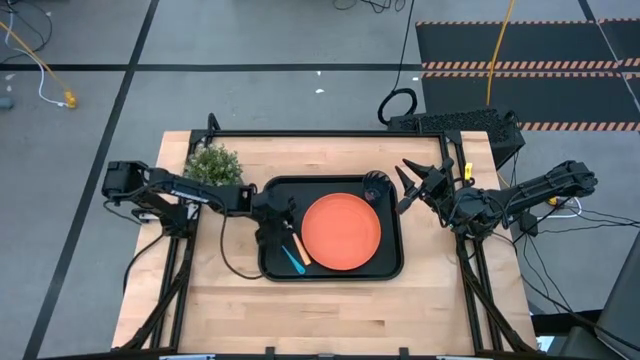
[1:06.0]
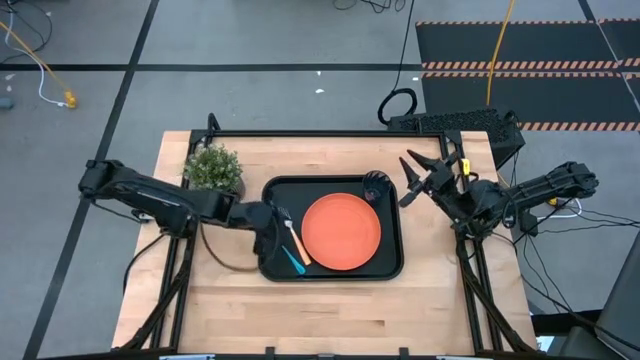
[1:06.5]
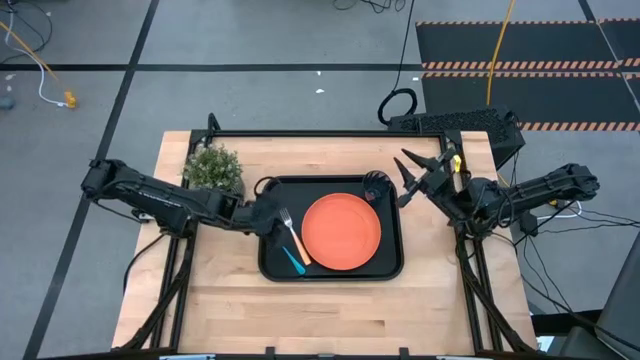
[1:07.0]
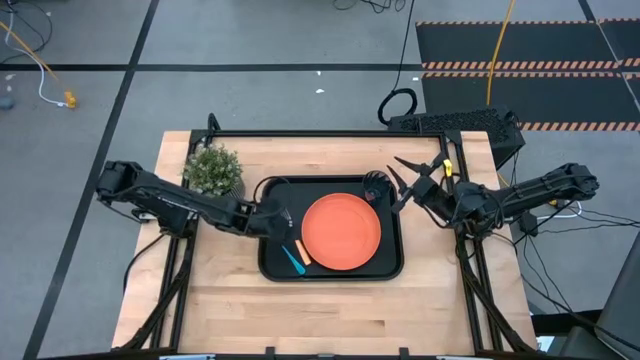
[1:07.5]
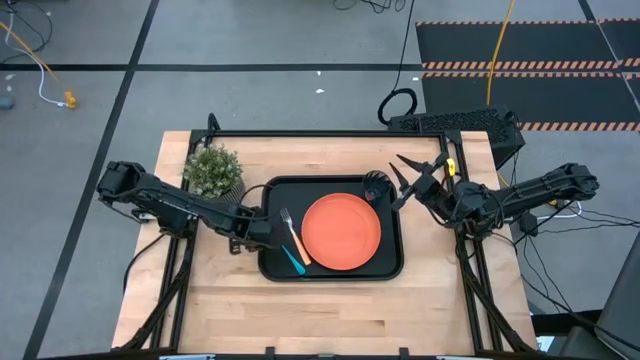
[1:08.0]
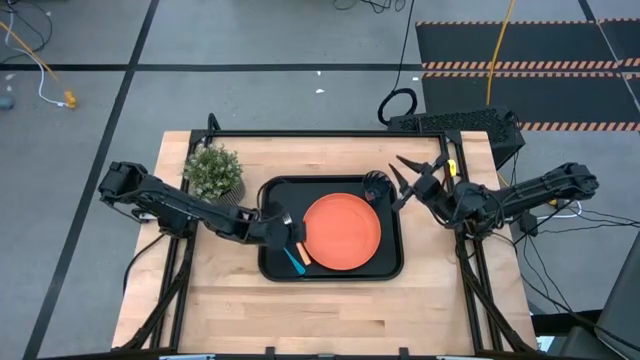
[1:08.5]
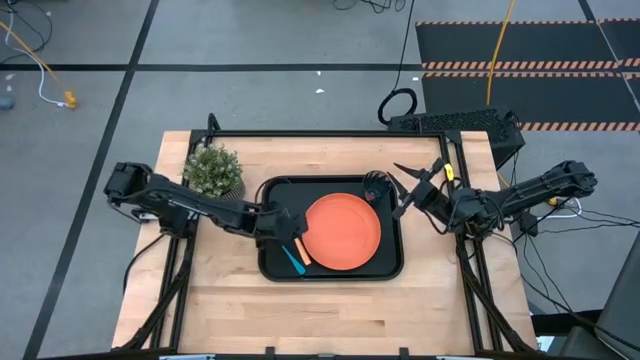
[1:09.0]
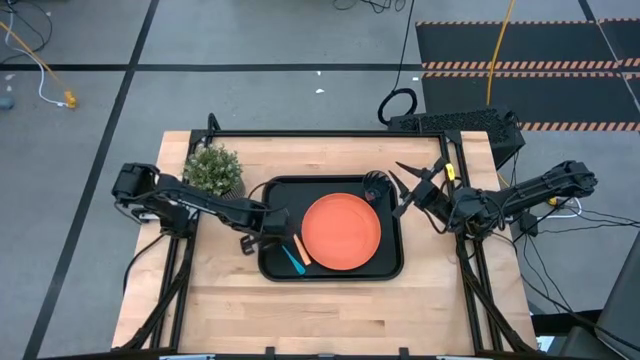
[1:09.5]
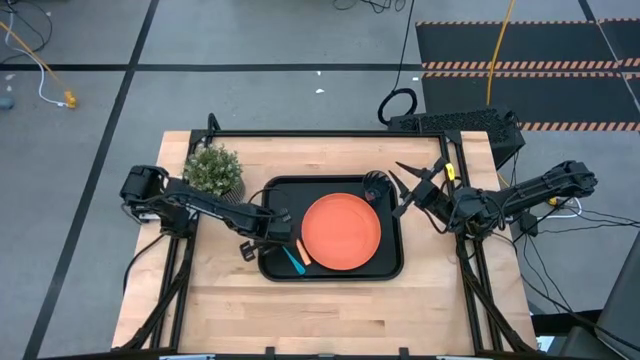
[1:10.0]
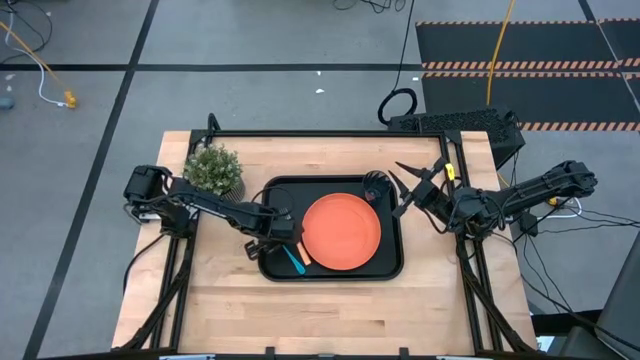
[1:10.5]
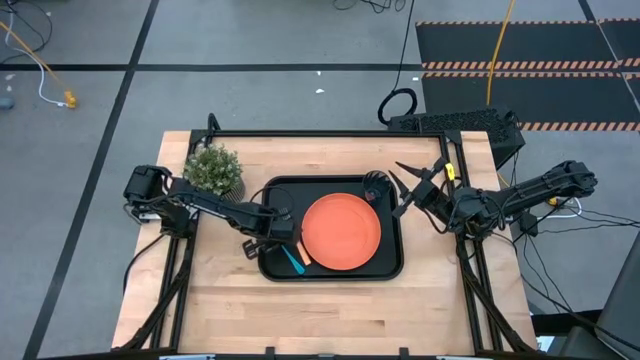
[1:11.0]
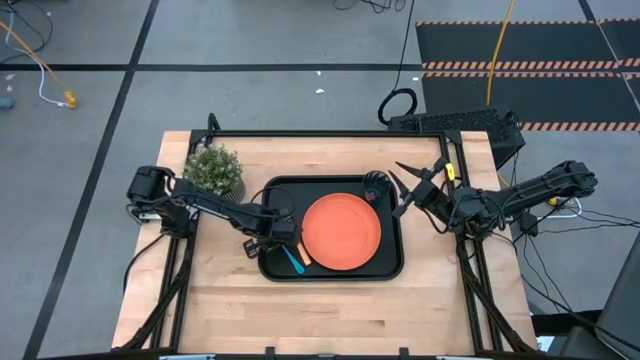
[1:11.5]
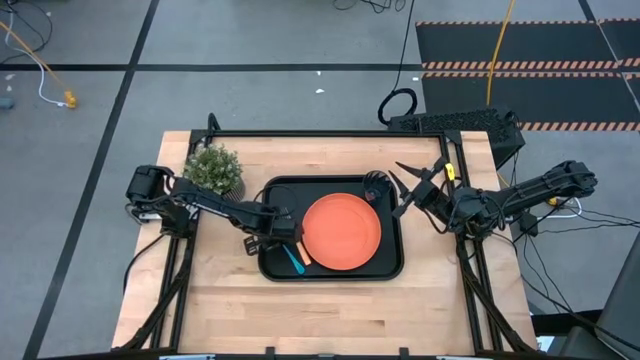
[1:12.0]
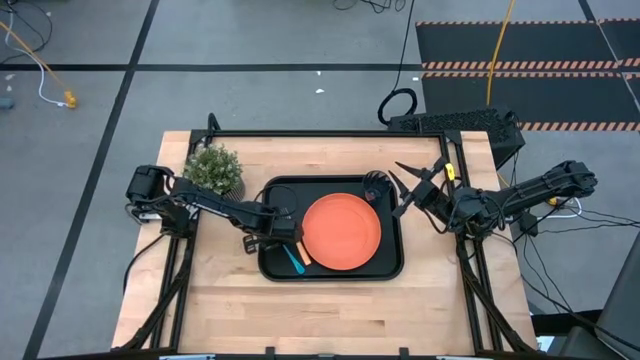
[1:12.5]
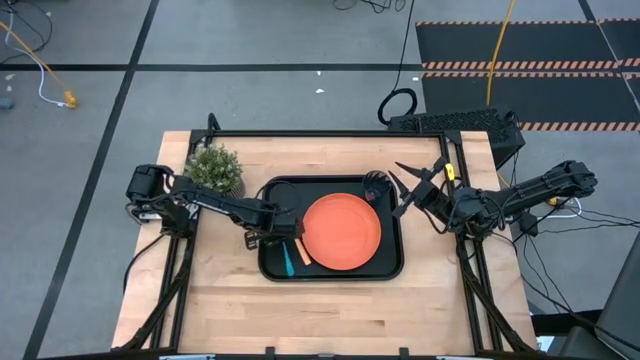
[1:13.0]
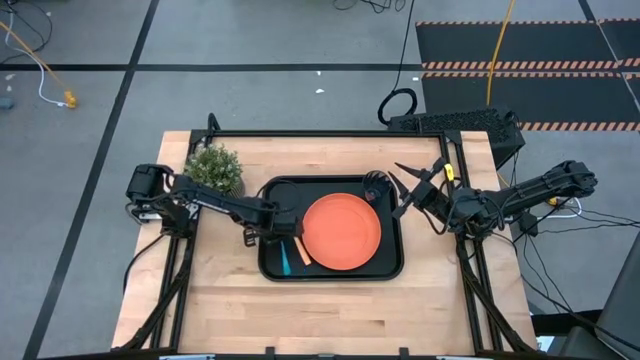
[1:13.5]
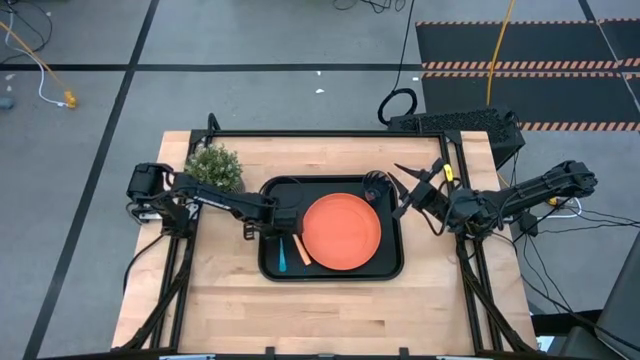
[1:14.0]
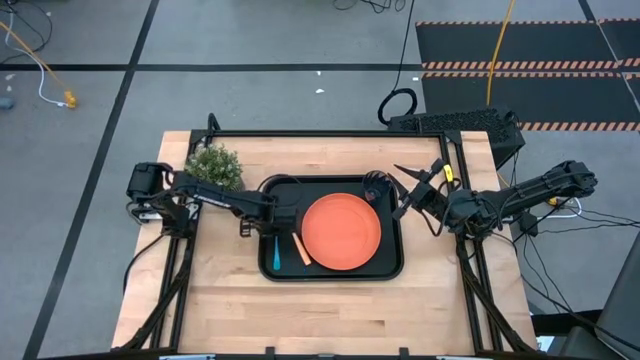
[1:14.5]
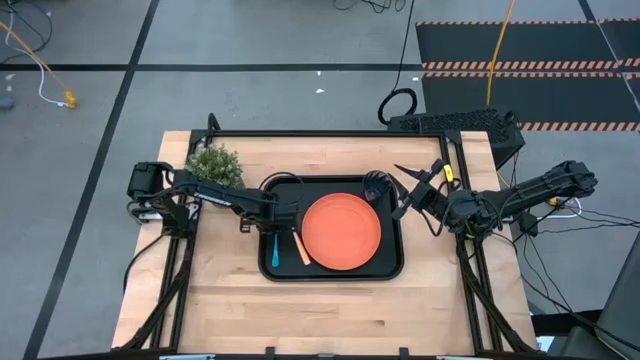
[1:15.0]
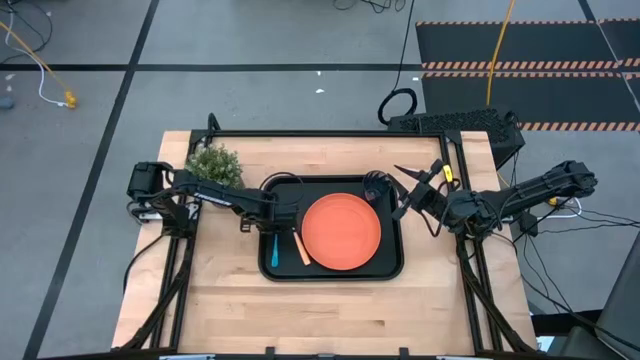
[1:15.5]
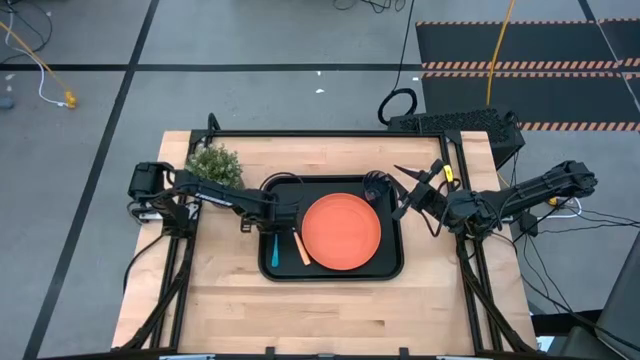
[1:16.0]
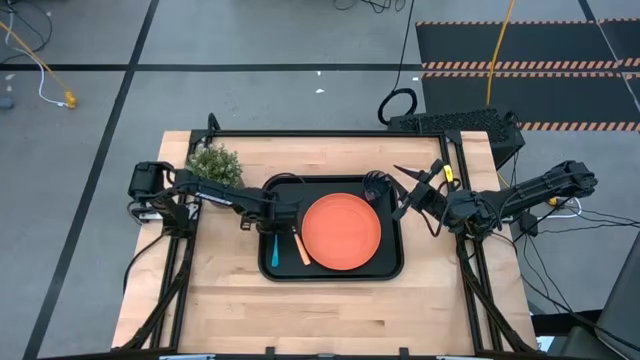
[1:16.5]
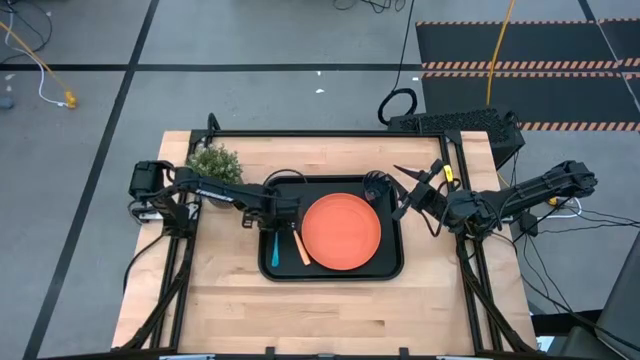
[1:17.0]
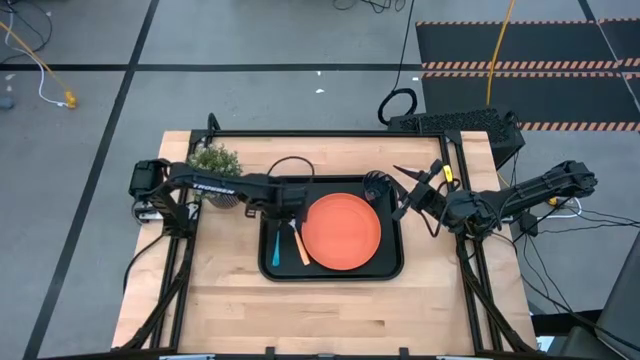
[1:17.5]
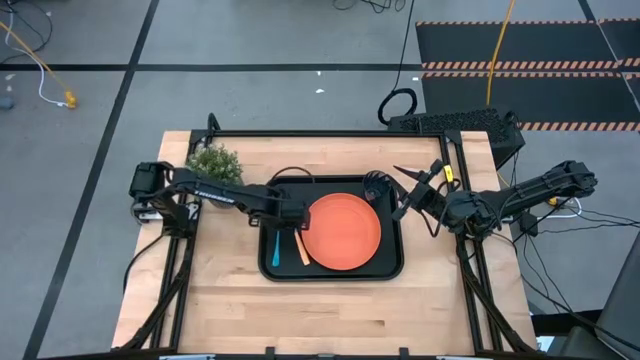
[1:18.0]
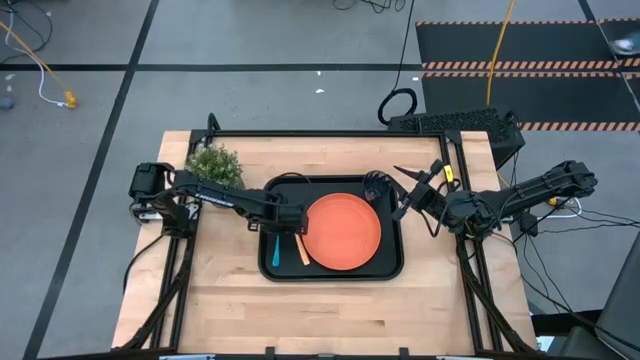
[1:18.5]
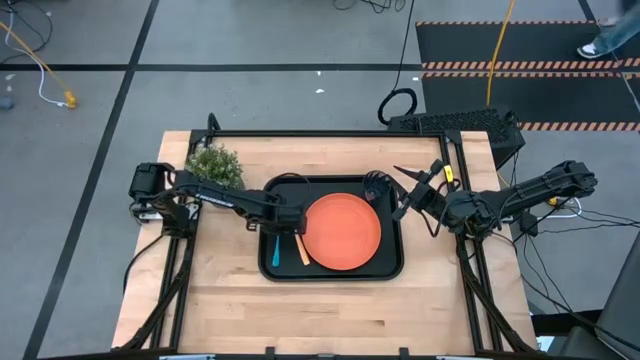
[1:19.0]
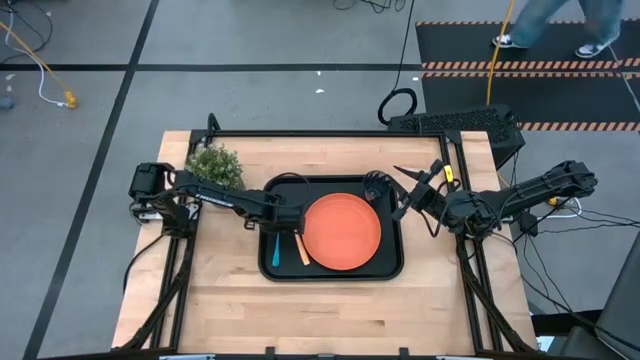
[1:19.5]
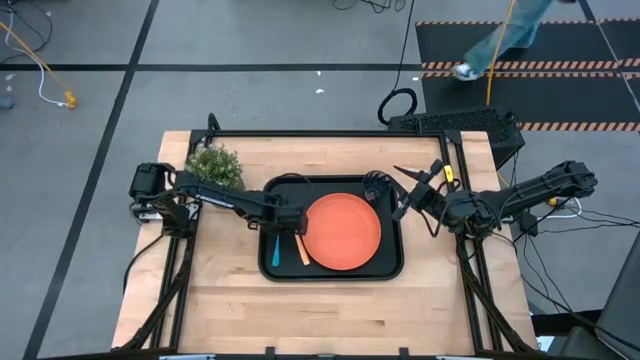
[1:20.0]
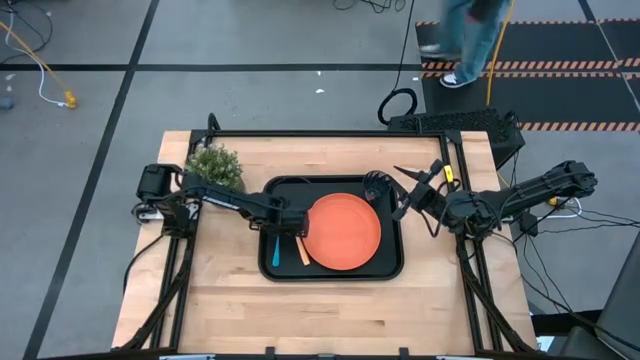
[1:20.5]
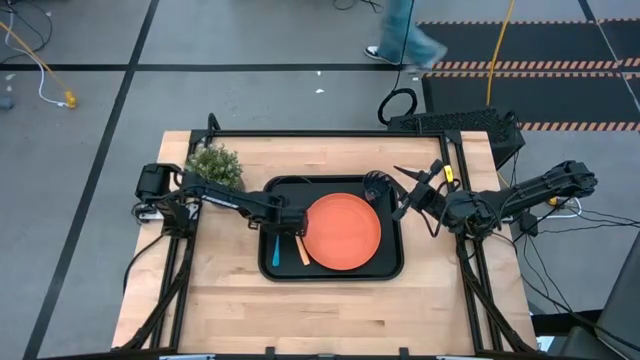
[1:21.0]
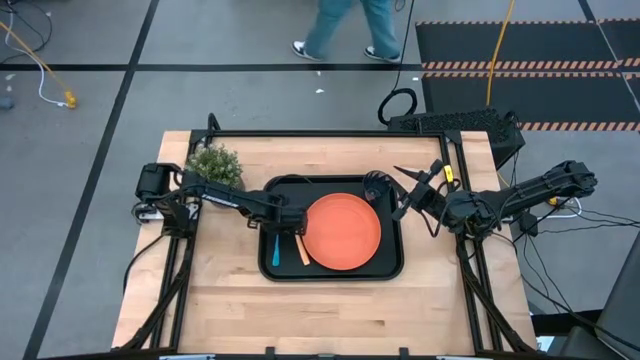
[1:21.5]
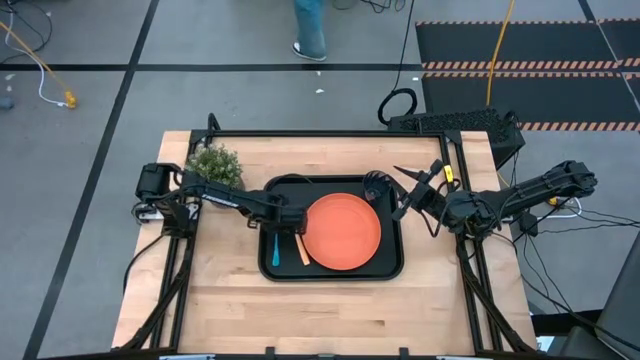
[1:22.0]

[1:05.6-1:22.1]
Task: Pick and place plate/cup/fork/spoon on tray
Adjust the blue spoon on the black serving tray

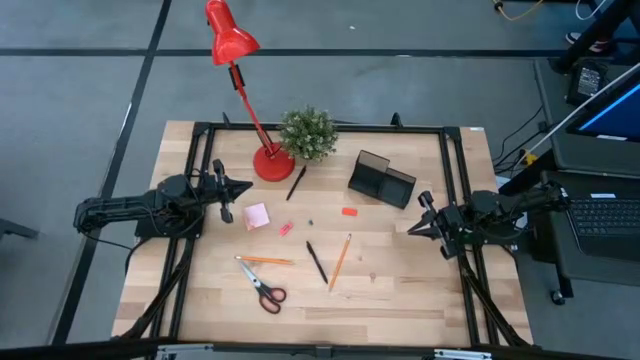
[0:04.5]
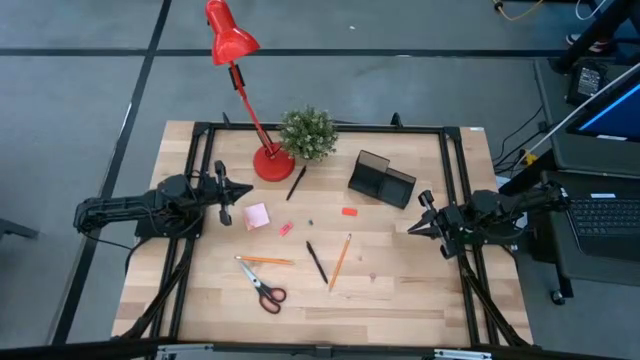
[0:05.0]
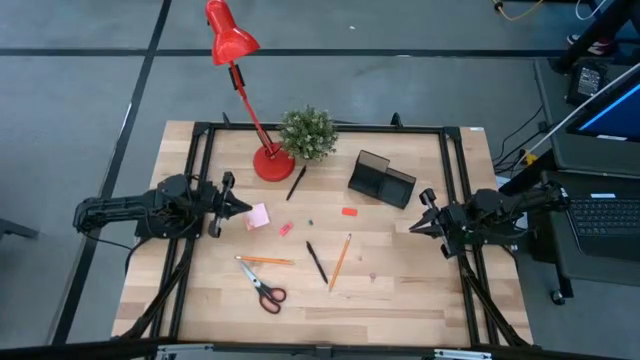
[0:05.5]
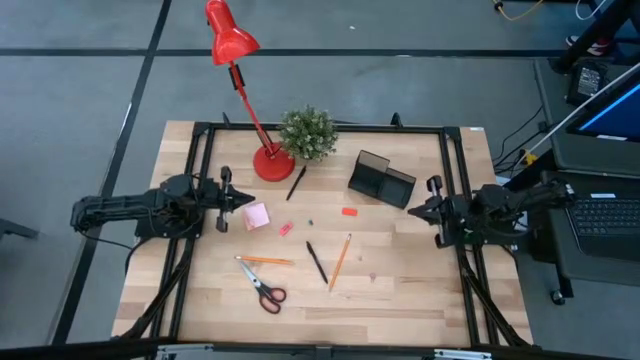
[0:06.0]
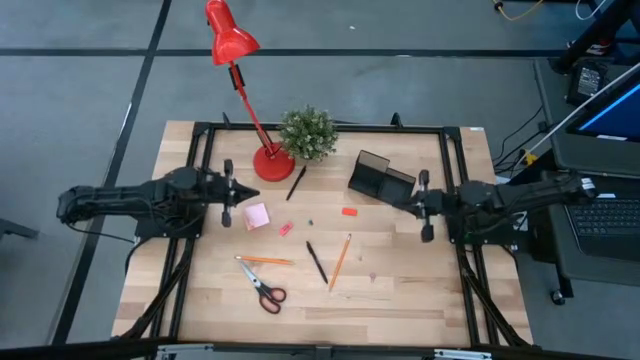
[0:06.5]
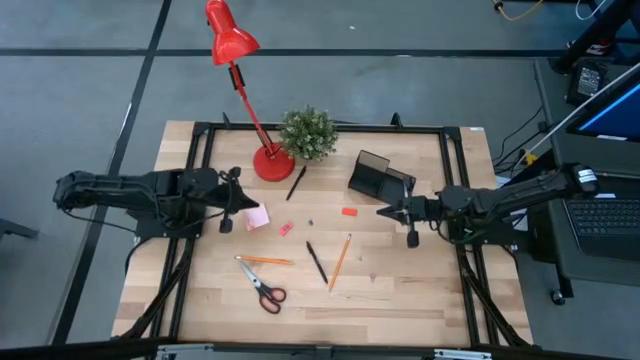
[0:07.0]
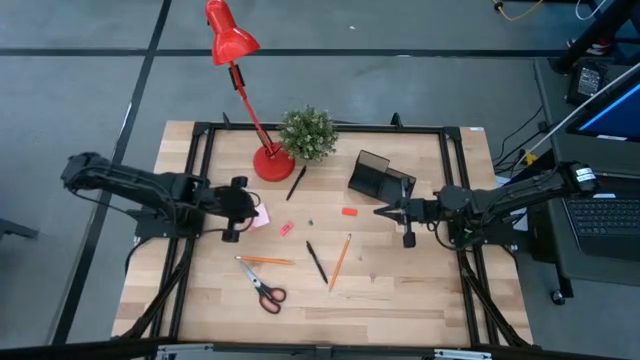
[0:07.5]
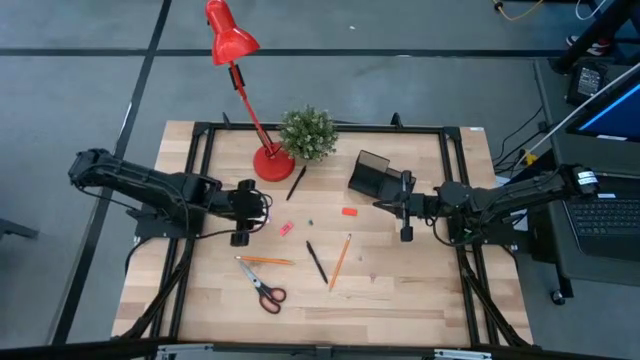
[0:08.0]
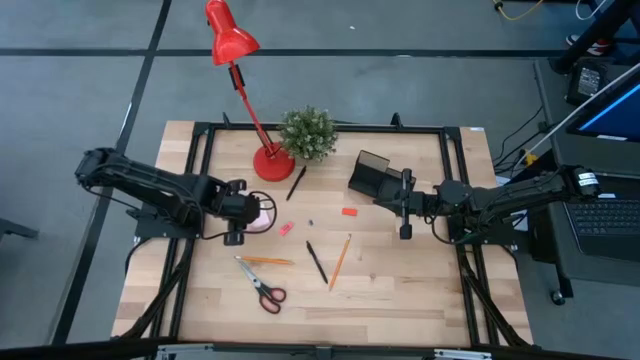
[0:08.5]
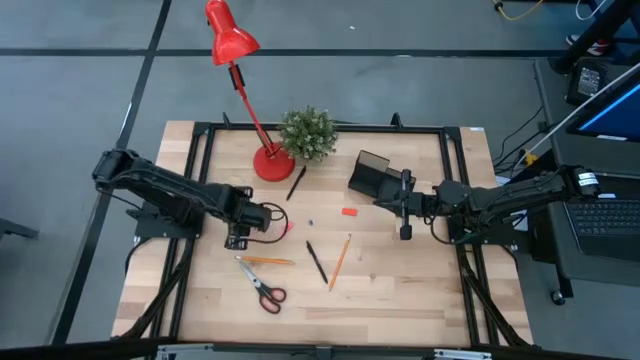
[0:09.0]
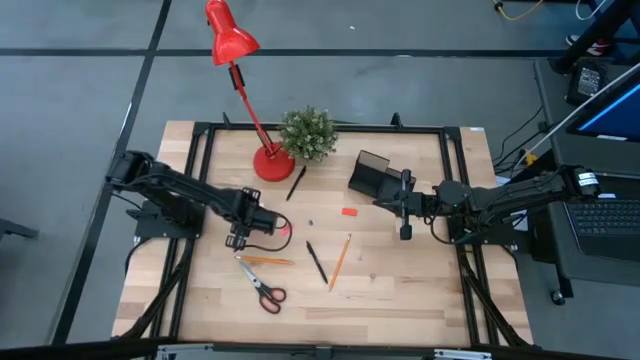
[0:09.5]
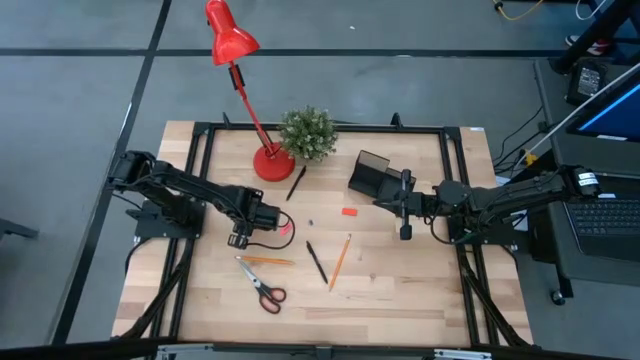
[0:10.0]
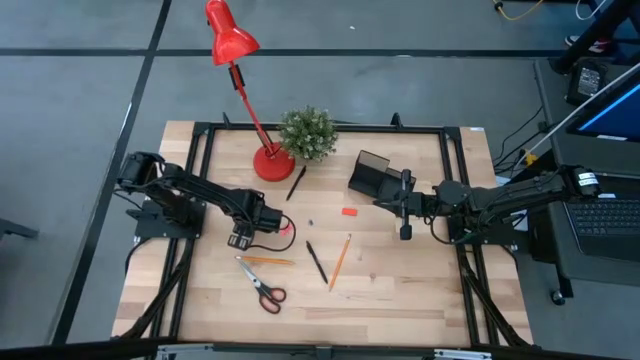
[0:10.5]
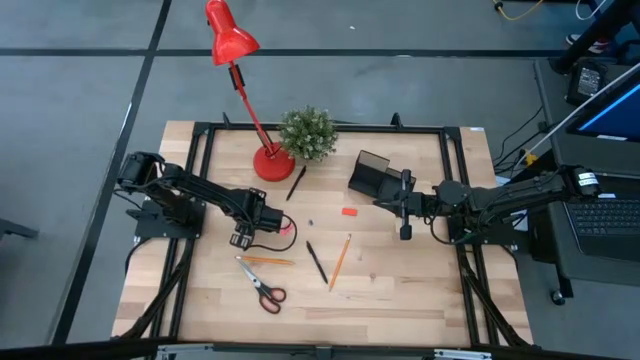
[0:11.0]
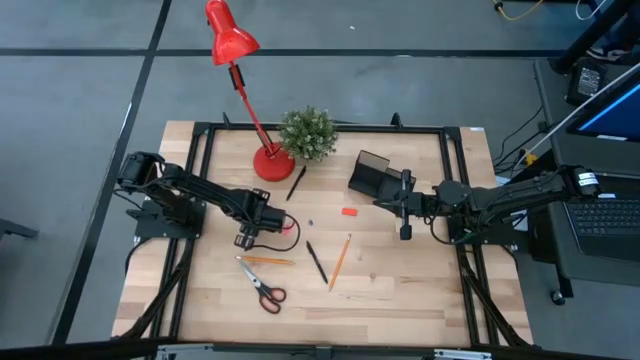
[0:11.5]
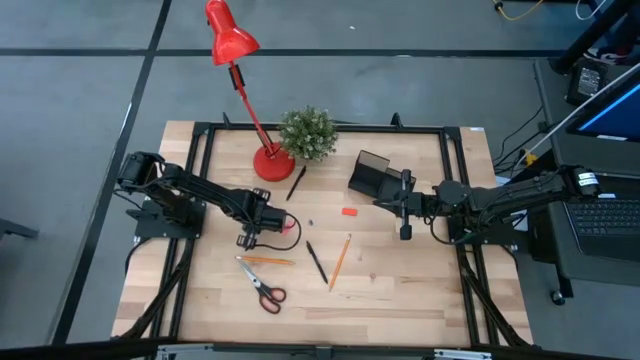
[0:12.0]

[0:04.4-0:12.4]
Task: Pick and place office supplies into organizer
Put the pink sticky notes into the black desk organizer
